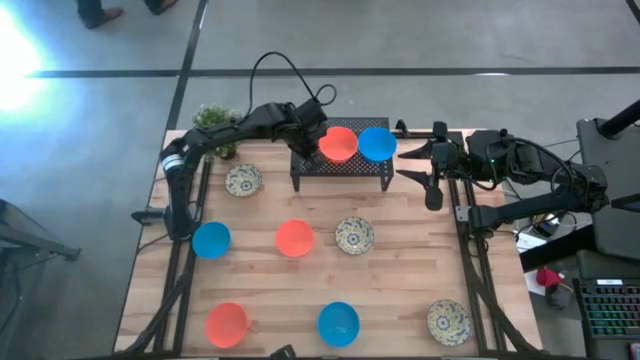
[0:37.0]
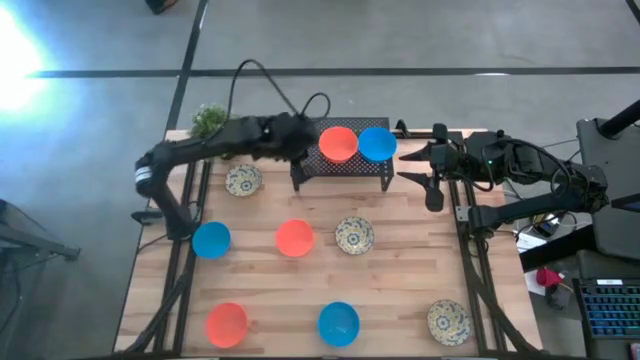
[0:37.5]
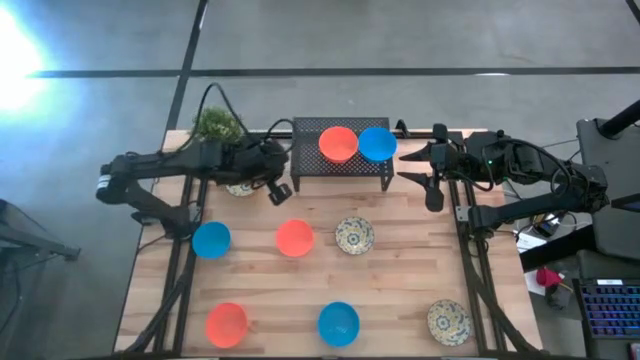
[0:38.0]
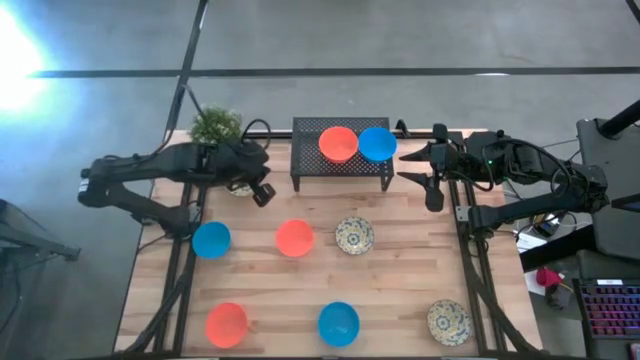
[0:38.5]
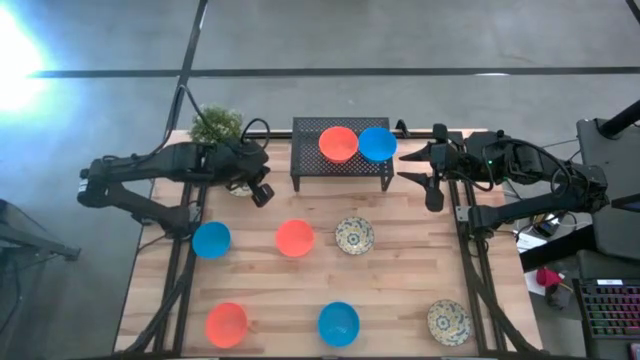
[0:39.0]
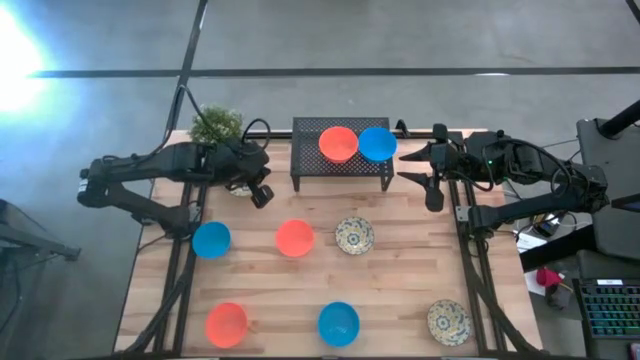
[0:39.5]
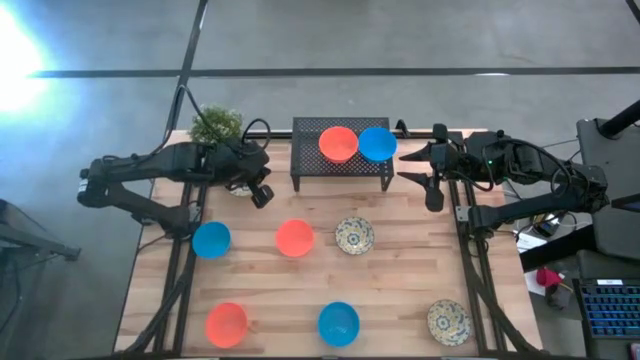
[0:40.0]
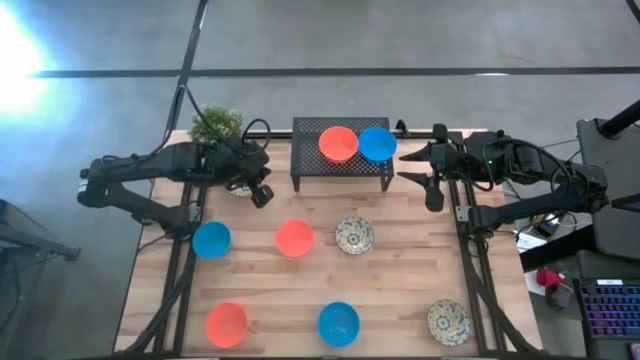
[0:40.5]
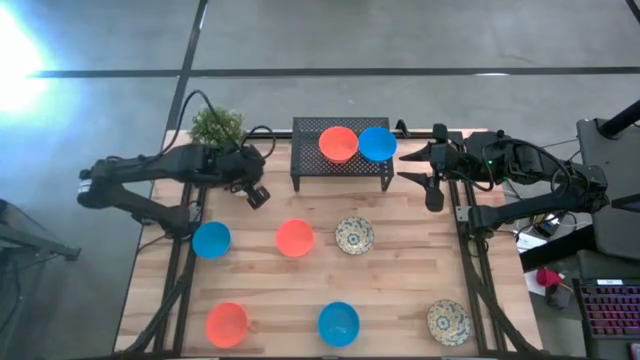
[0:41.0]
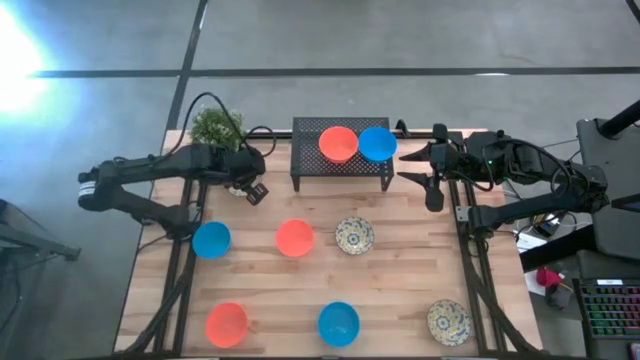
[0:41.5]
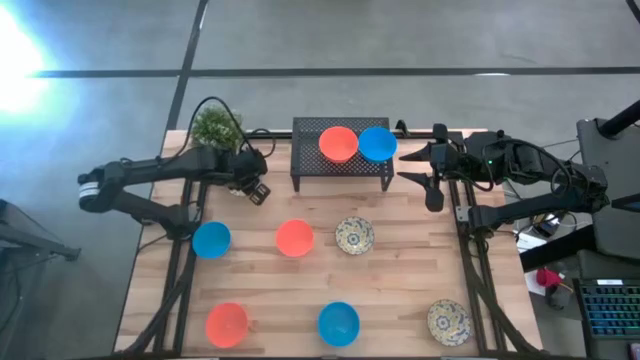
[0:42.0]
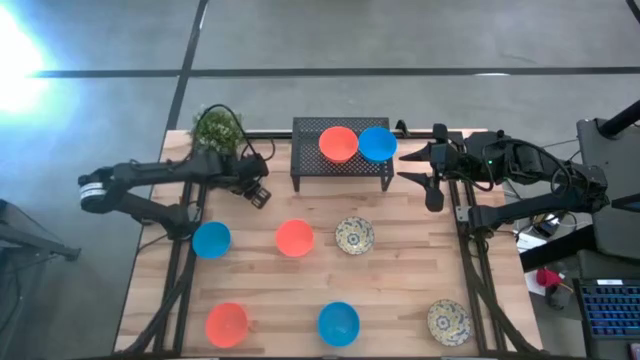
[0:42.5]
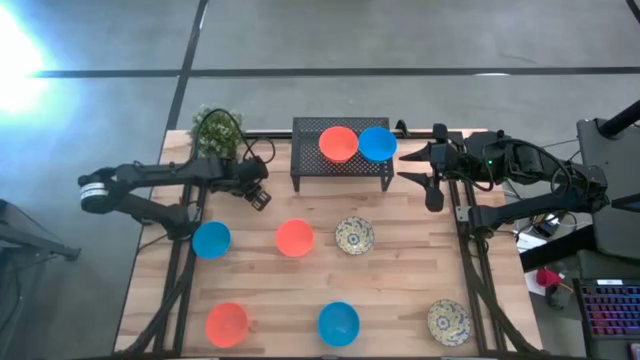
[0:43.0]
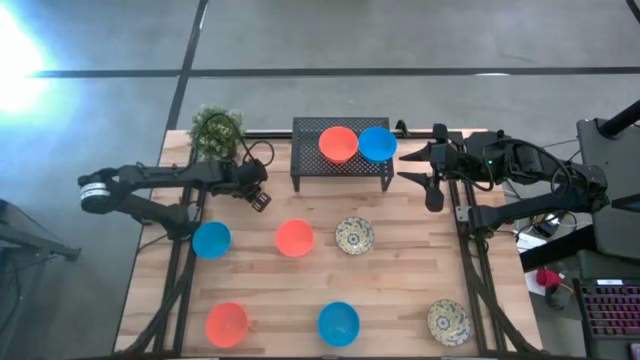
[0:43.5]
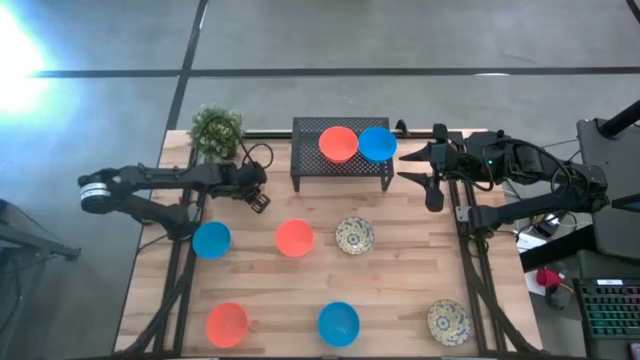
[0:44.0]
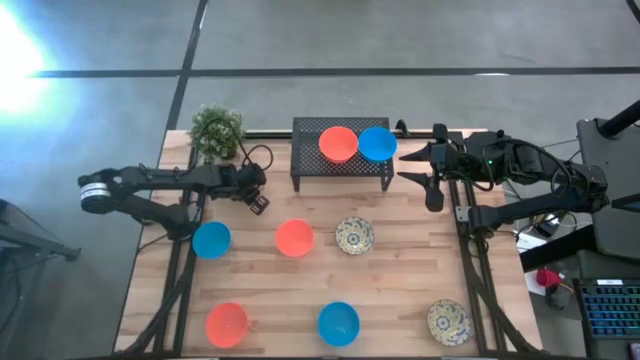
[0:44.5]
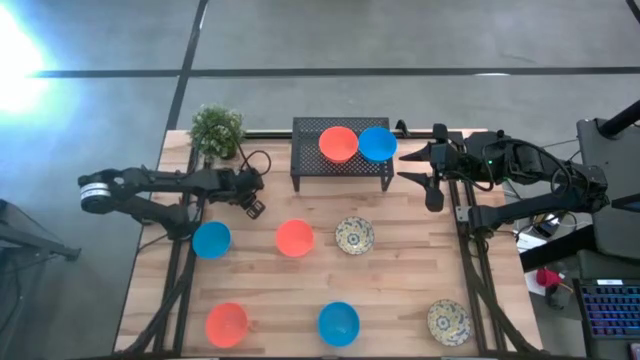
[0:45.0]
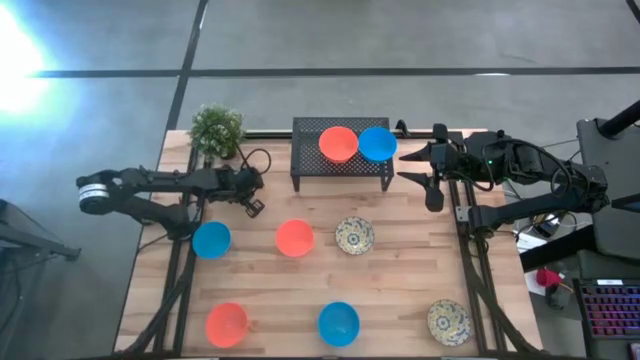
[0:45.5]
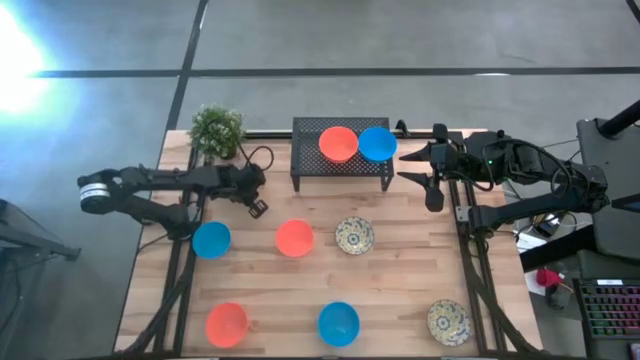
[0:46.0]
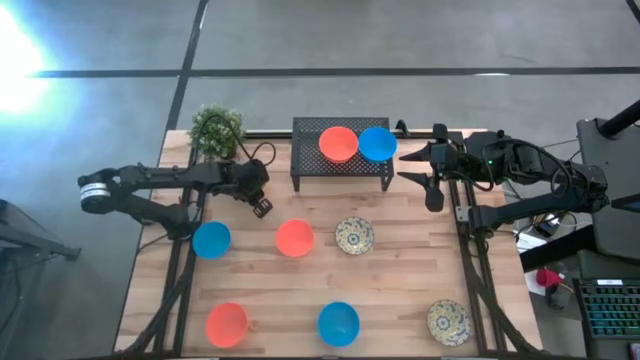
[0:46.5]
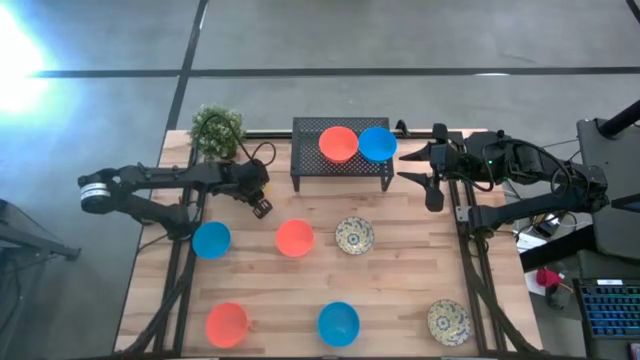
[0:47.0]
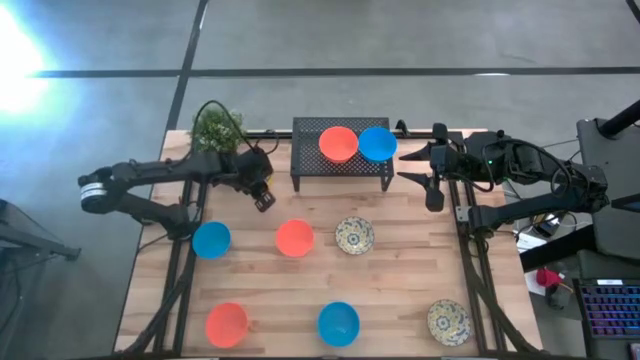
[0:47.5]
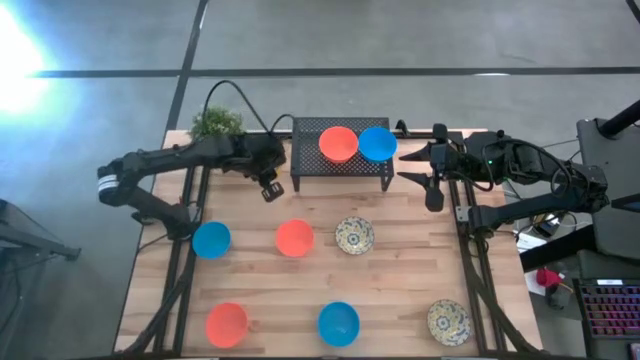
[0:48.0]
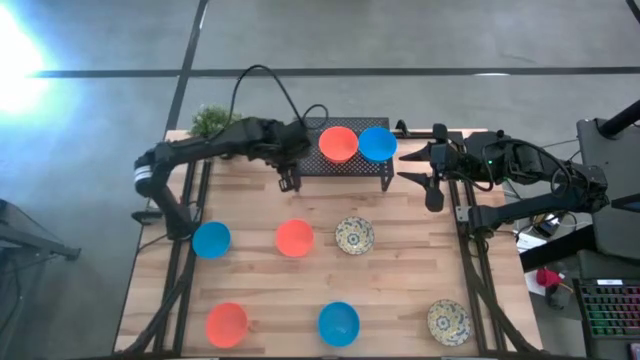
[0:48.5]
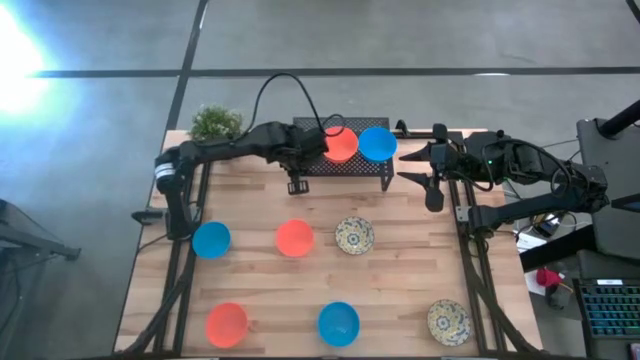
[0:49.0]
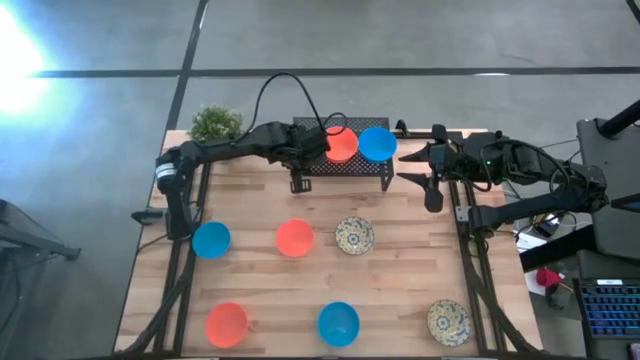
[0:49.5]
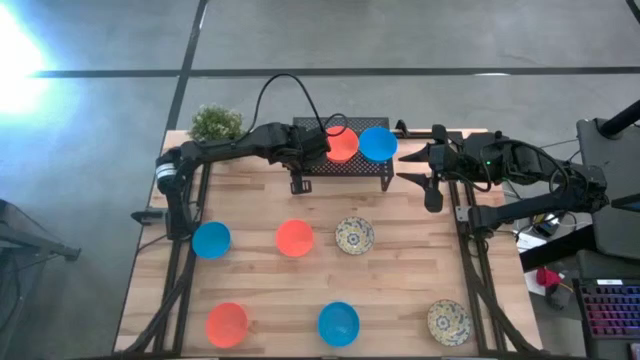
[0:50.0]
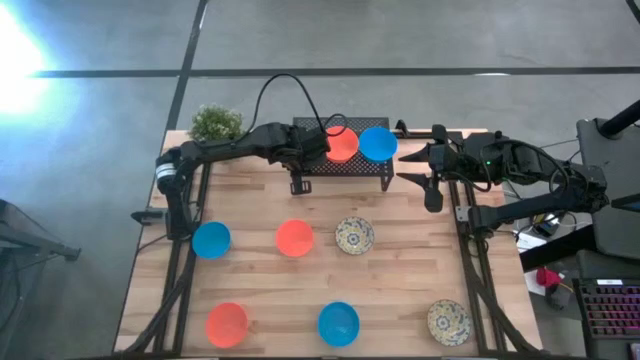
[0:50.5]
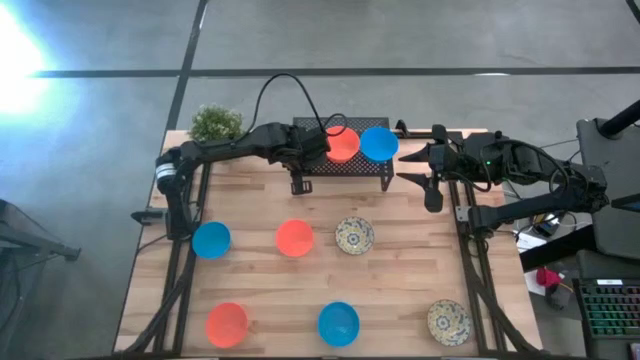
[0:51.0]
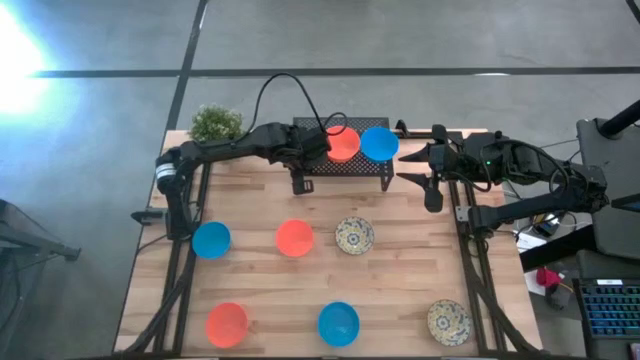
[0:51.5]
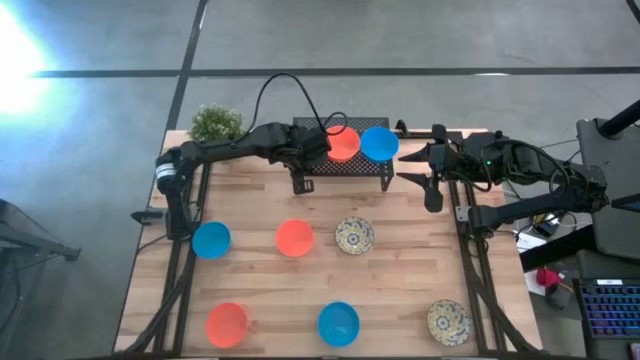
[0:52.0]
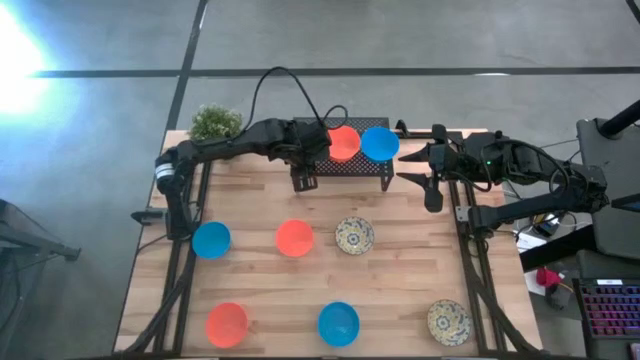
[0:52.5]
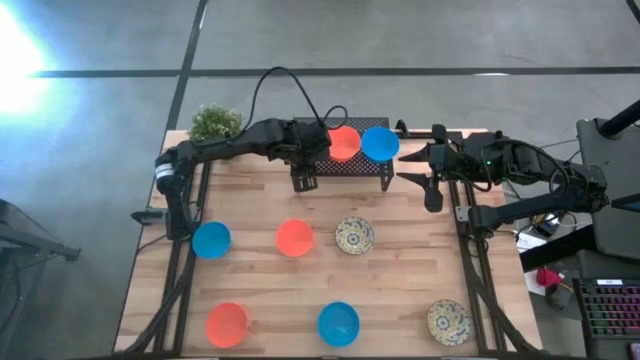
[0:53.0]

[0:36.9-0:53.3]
Task: Pick & Place Mini bowls
Put the top left yellow patterned bowl on the shelf

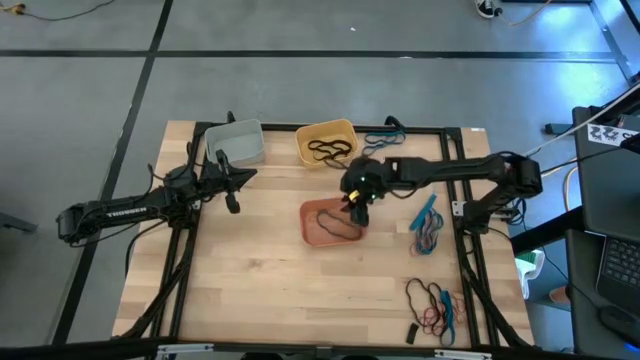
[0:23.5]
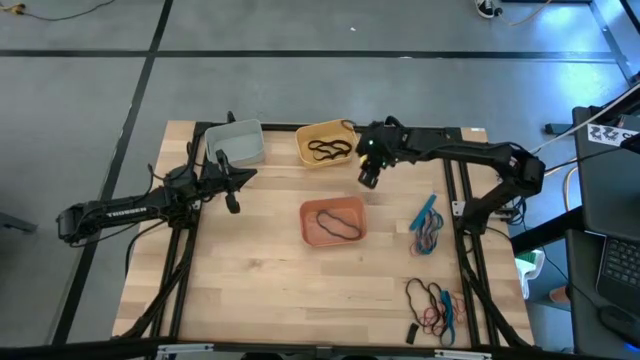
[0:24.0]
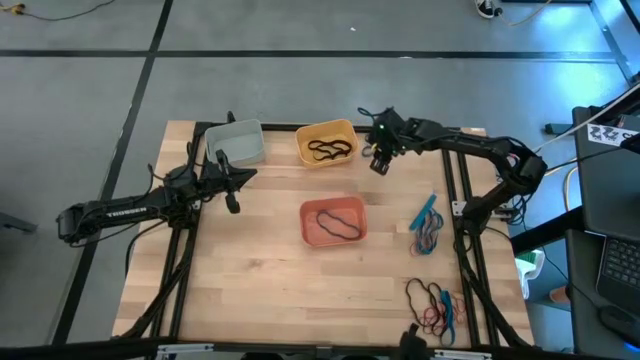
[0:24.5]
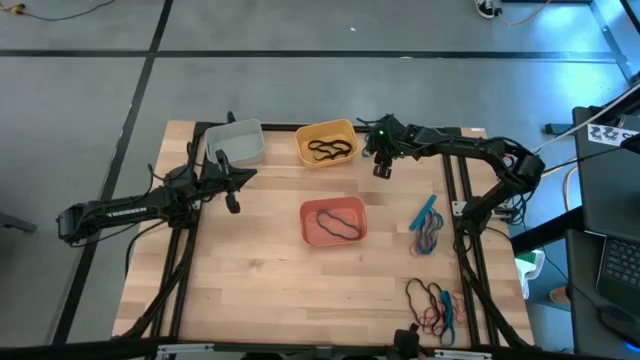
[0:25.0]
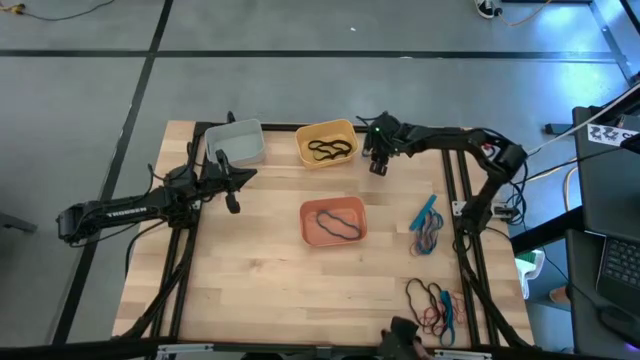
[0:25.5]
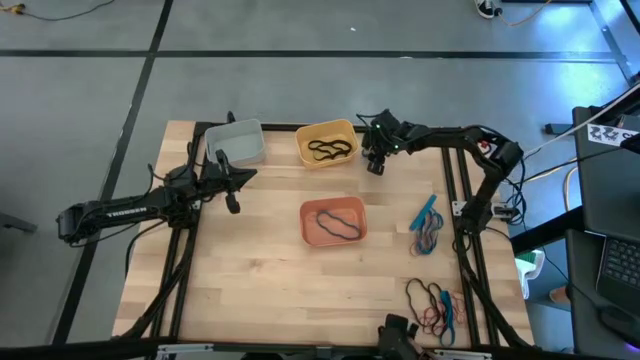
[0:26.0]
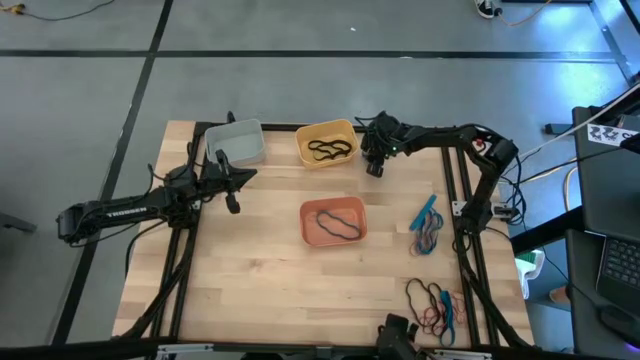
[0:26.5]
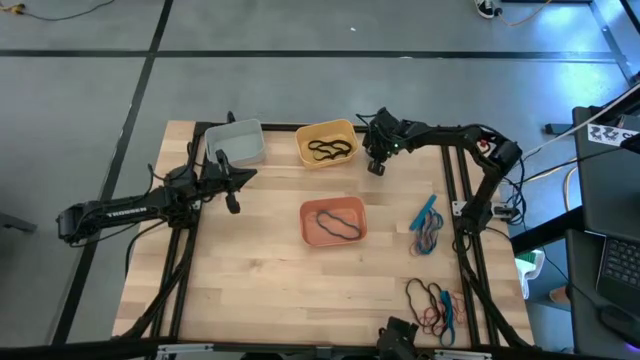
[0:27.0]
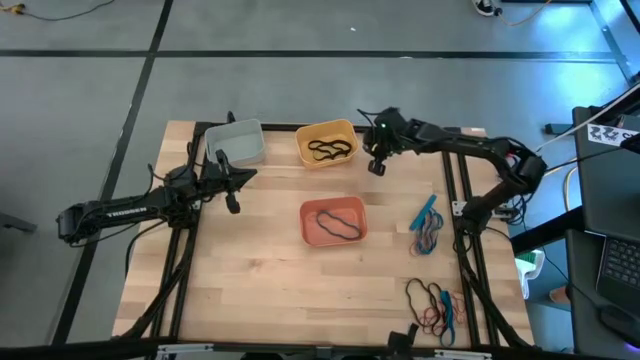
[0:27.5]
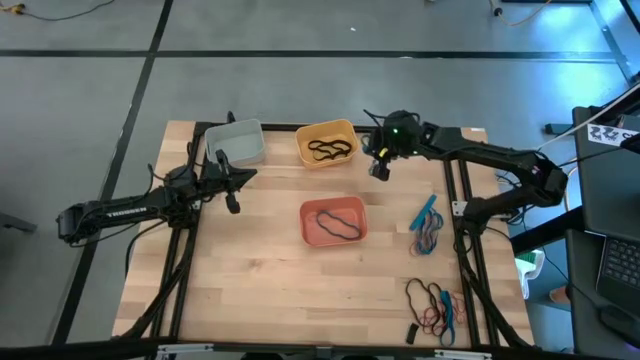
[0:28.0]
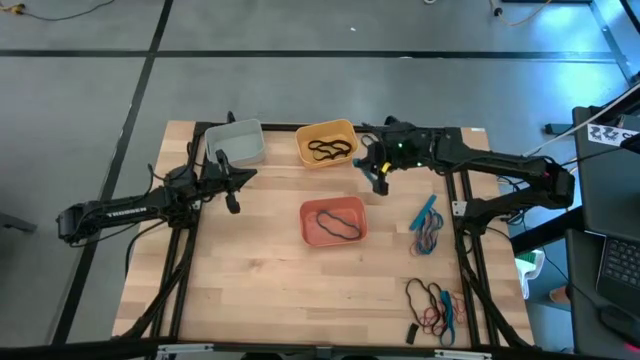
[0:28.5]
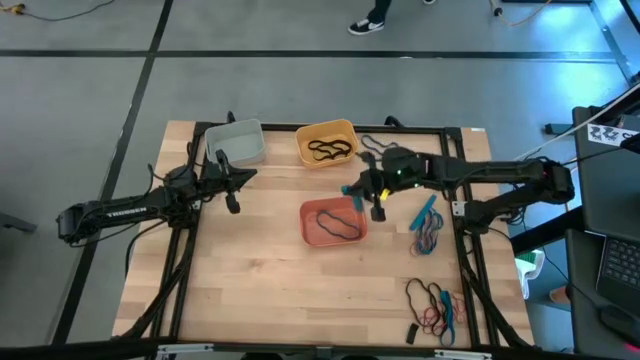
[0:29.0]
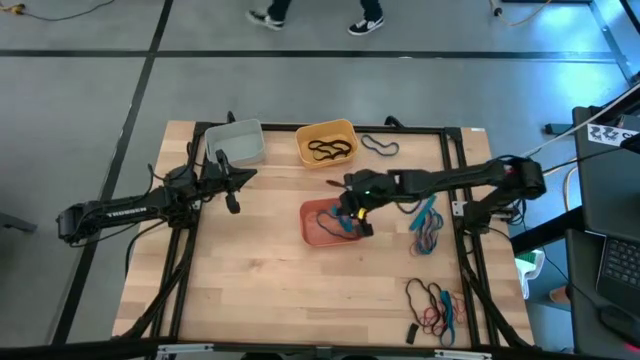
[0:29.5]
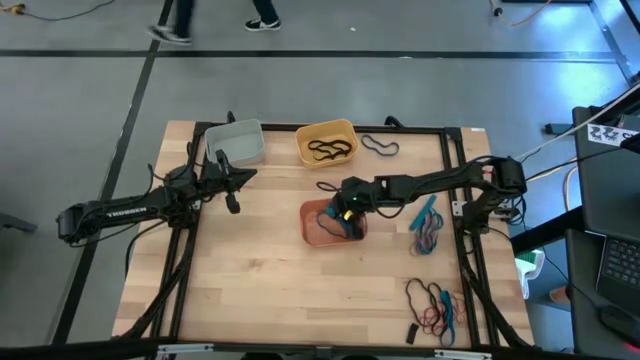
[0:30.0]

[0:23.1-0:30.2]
Task: Sort rubber bands into baskets
Put the blue rubber band into the orange bin
